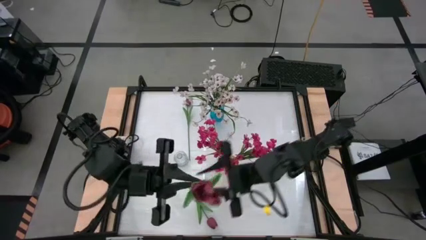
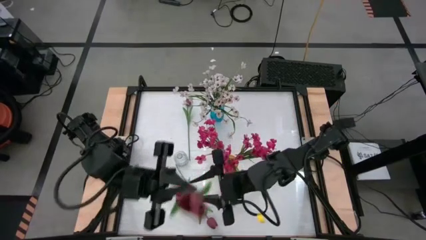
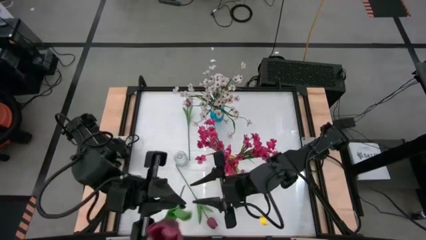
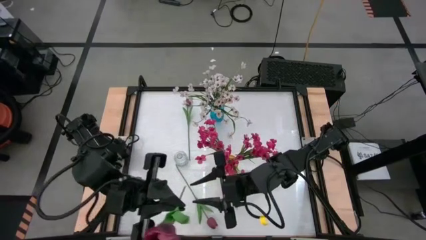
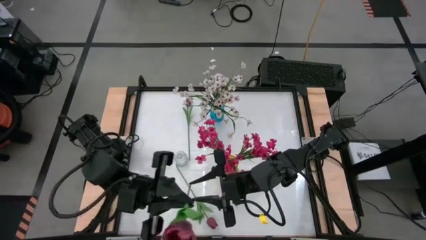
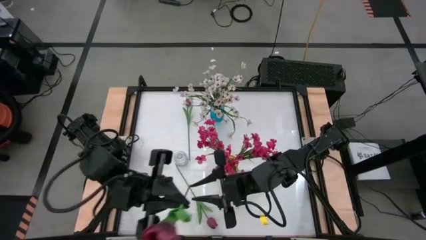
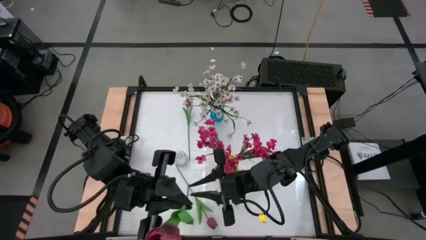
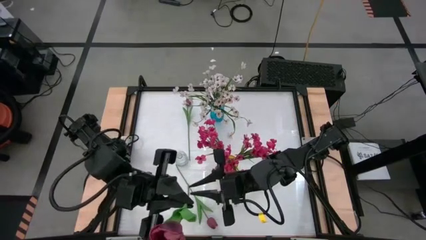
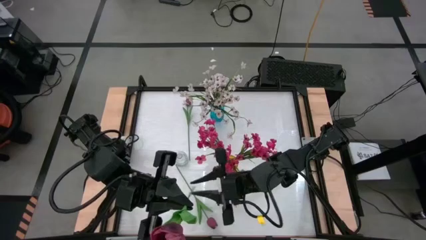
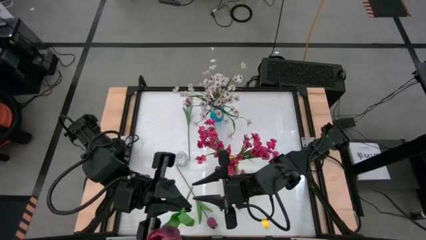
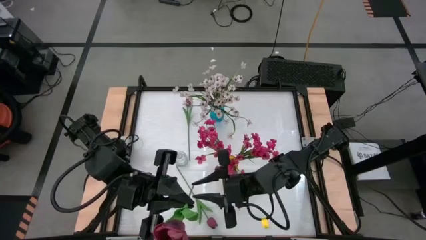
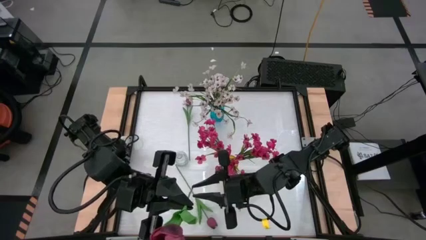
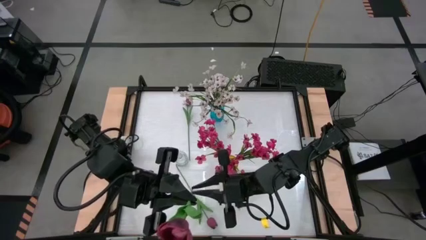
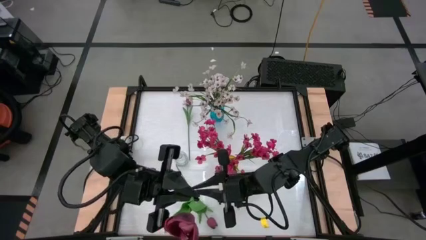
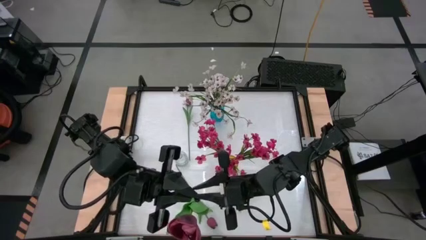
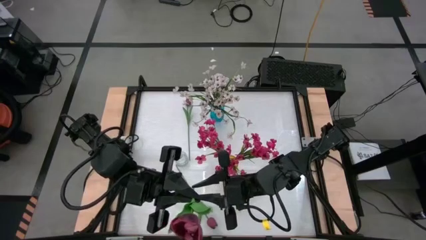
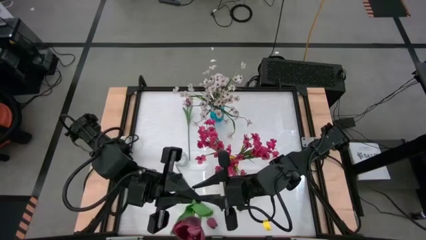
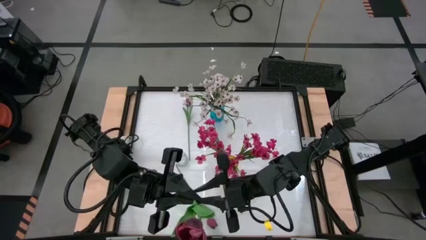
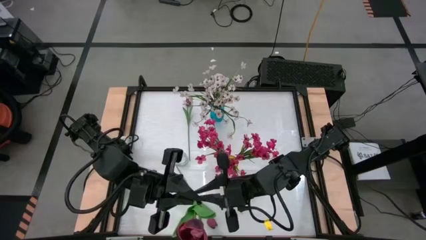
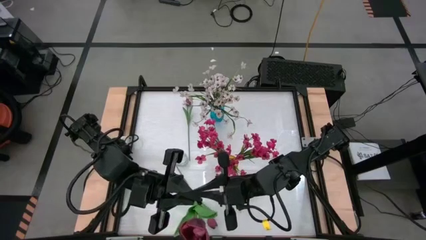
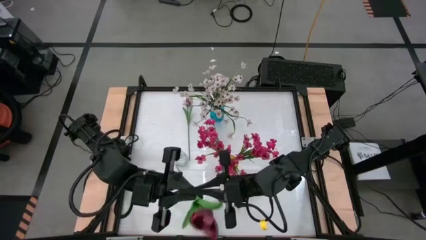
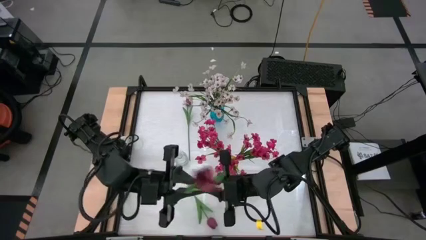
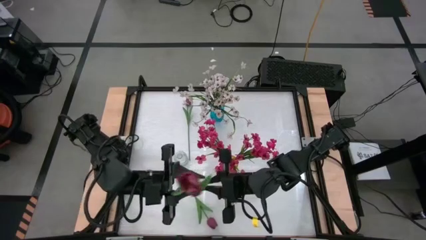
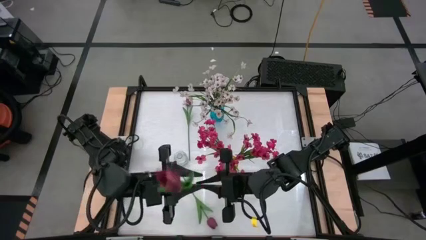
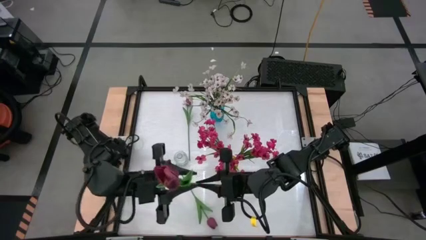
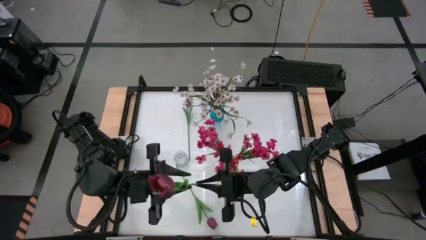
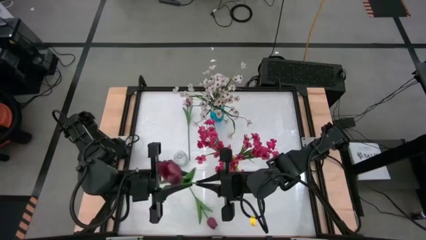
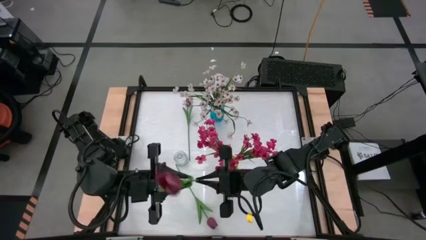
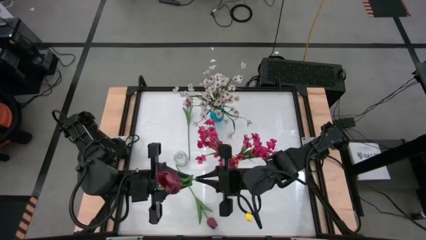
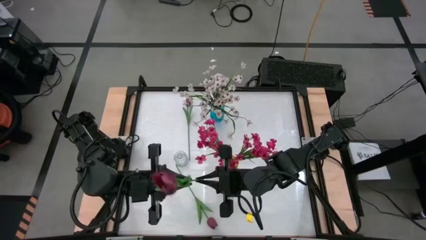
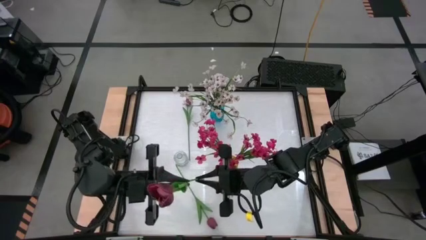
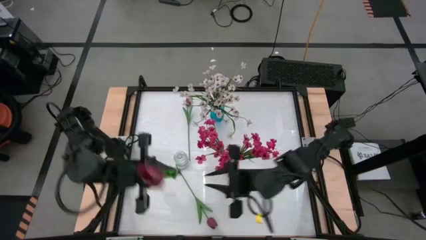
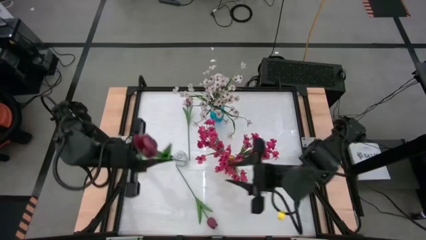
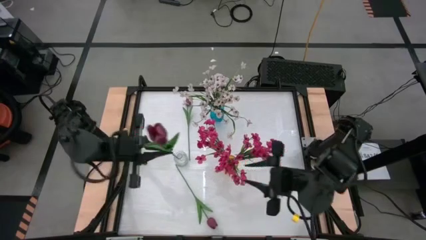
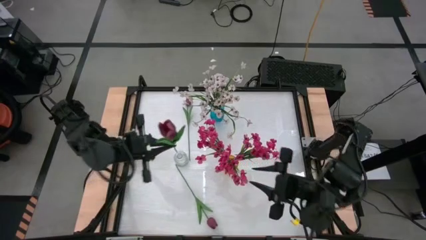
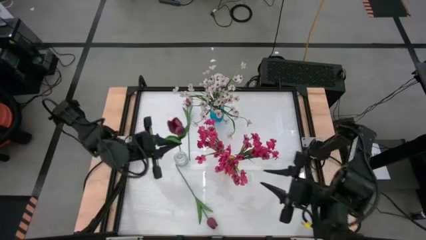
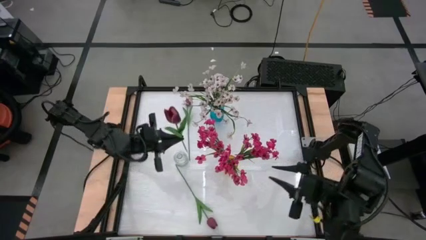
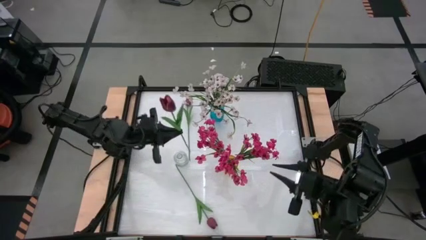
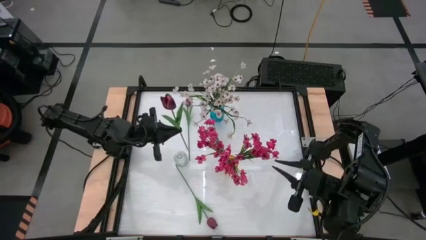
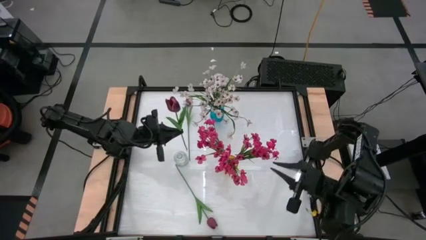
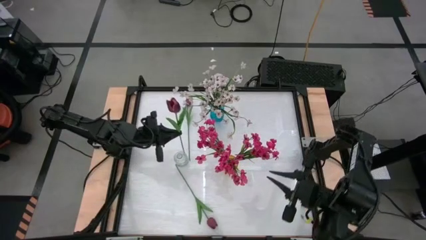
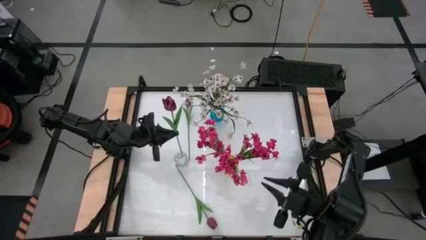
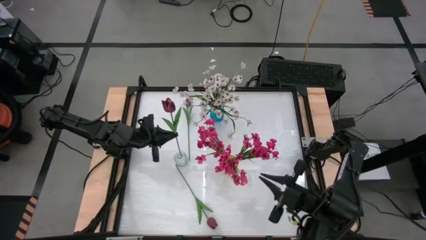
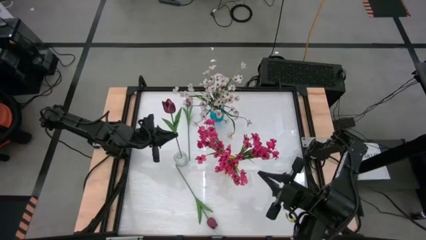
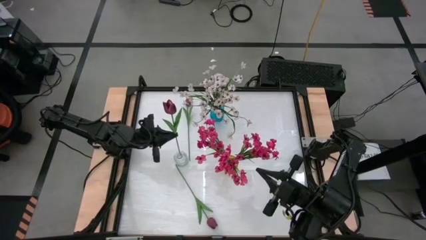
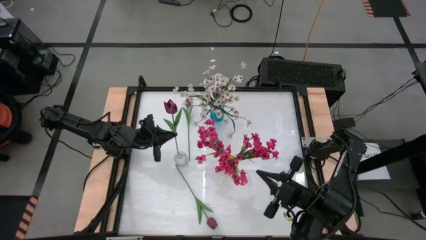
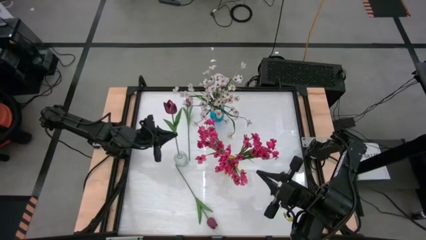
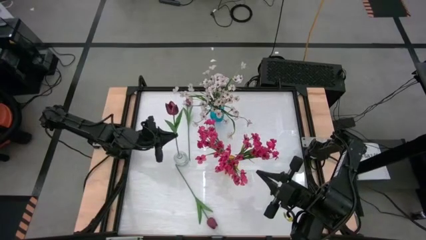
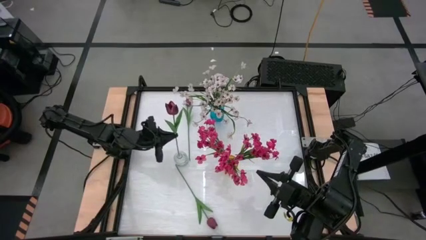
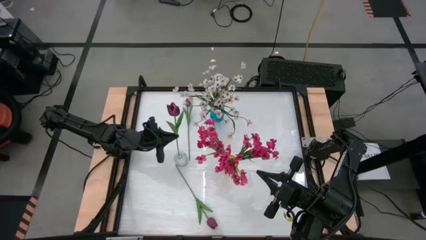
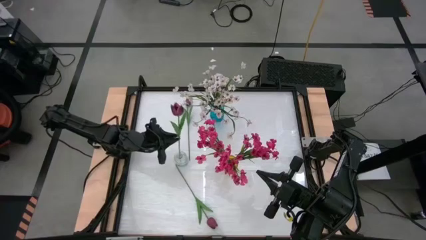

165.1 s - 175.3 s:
Task: Sort flowers into vase by color
Put the right red flower into the transparent vase
